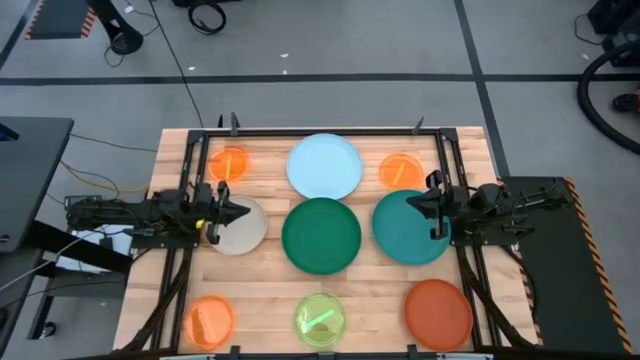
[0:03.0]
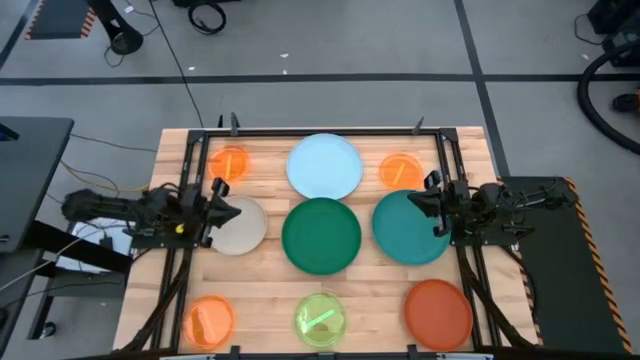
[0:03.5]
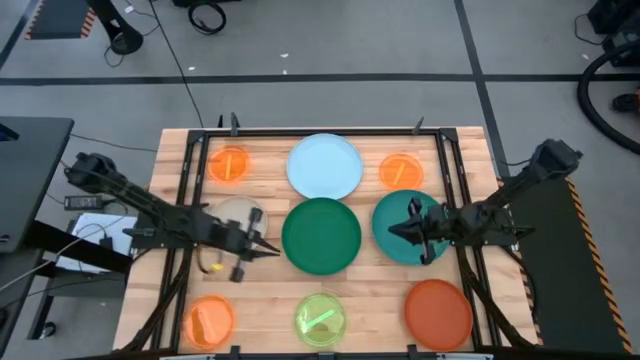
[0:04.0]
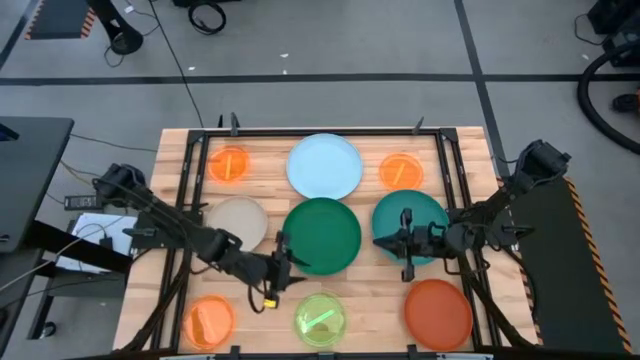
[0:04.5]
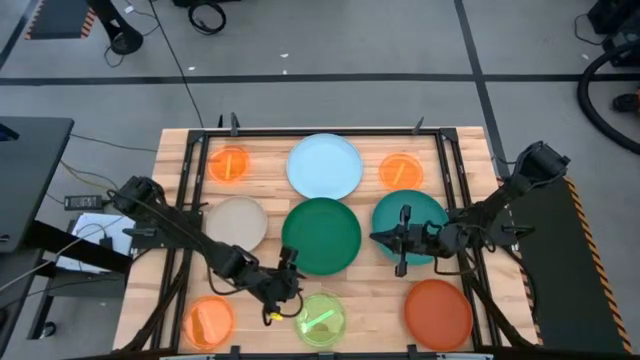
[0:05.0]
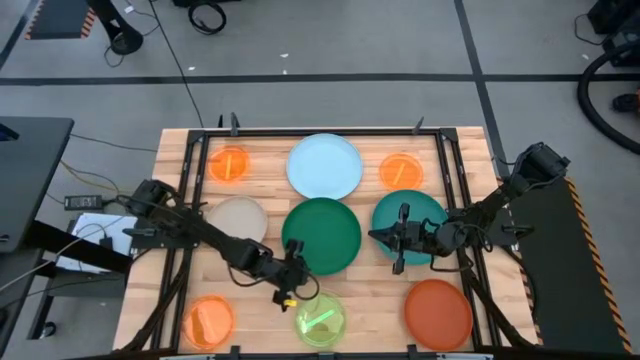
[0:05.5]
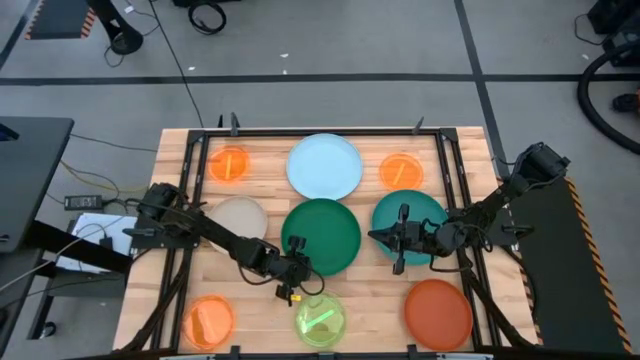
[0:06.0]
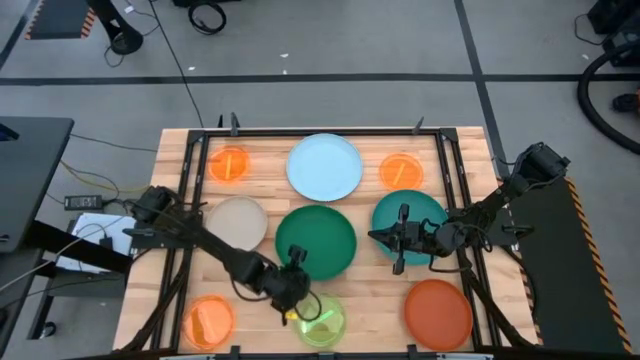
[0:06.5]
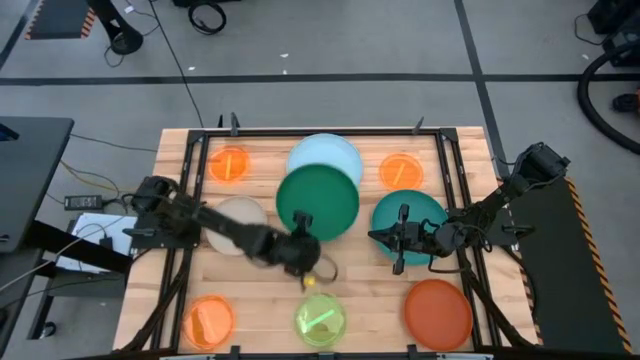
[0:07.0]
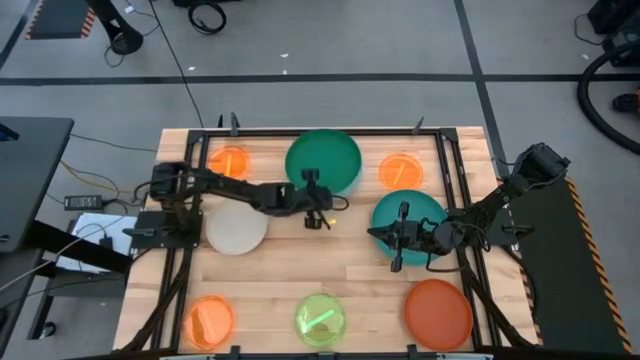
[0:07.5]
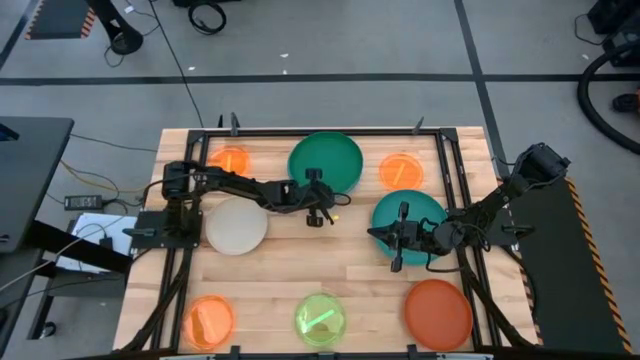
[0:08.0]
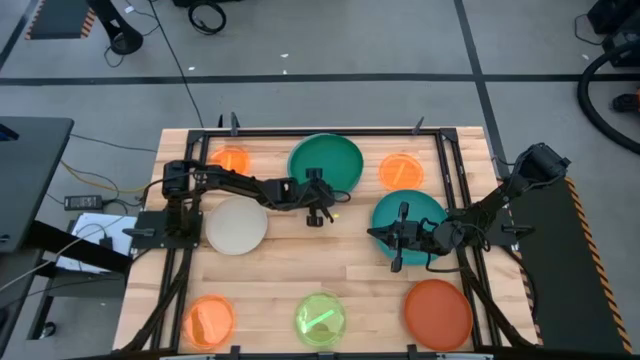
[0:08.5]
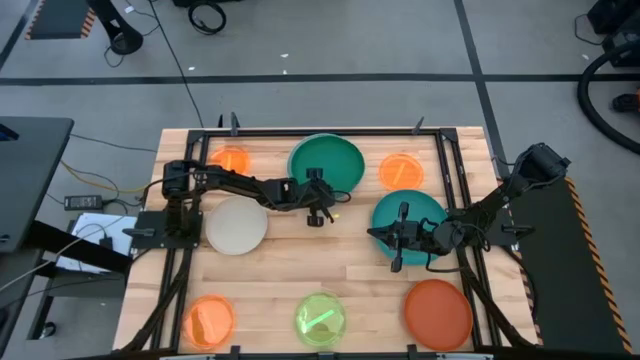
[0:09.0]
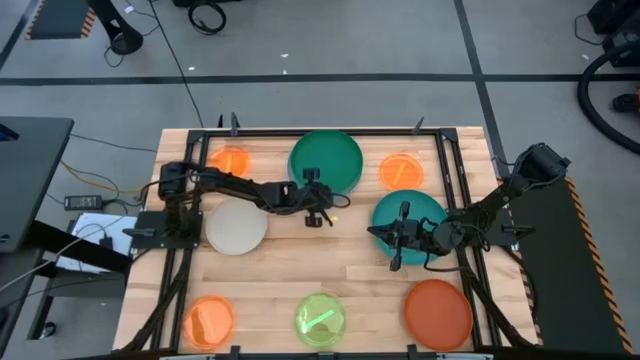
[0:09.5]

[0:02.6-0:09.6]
Task: Stack plastic plates
Stack the dark green plate on top of the light blue plate

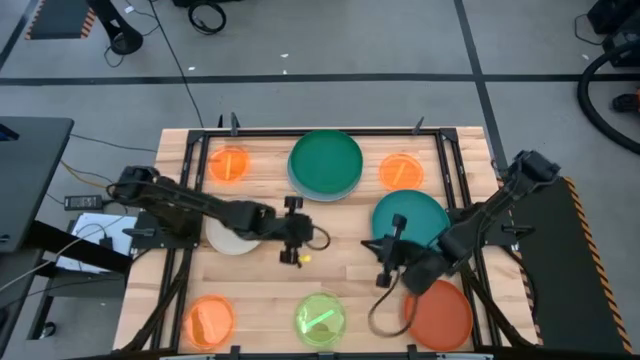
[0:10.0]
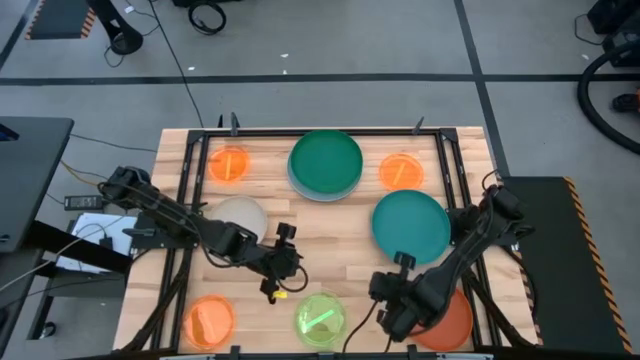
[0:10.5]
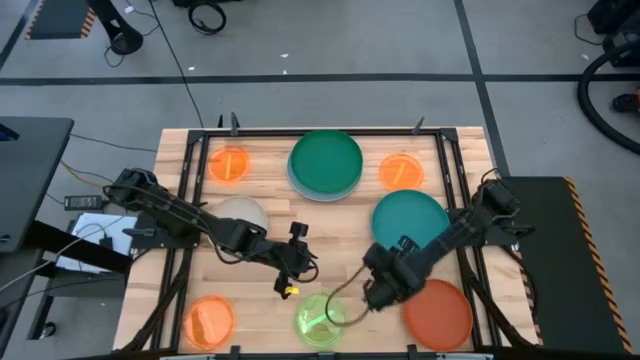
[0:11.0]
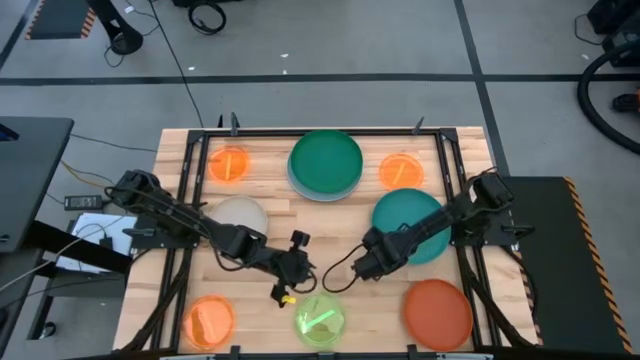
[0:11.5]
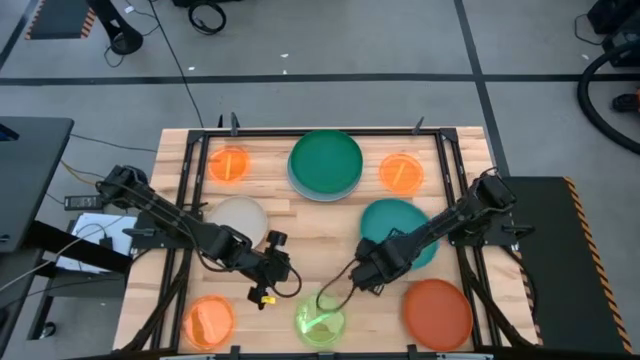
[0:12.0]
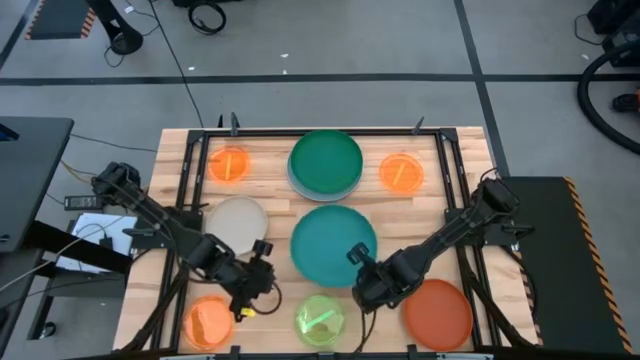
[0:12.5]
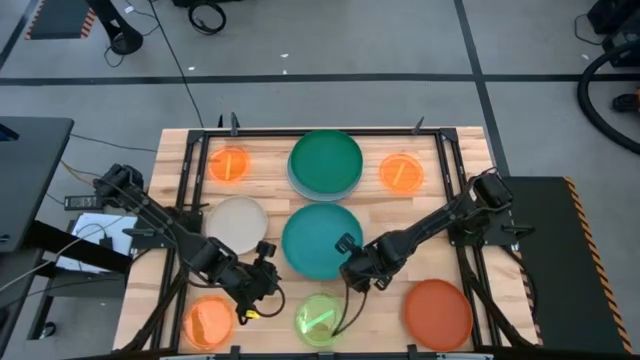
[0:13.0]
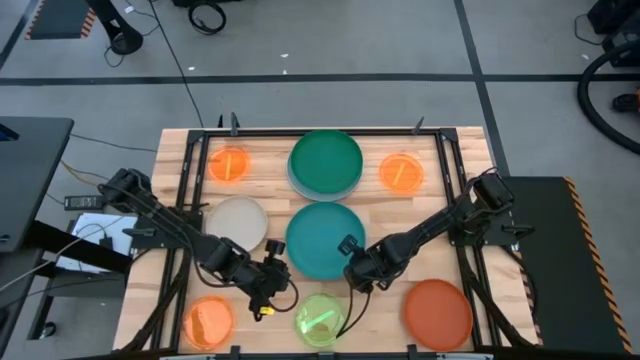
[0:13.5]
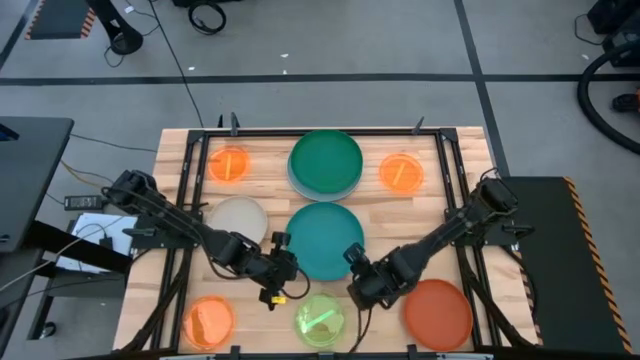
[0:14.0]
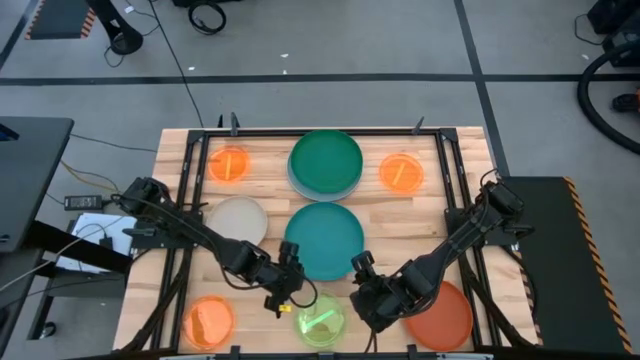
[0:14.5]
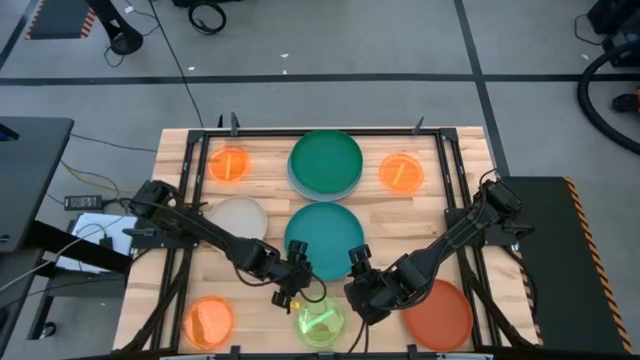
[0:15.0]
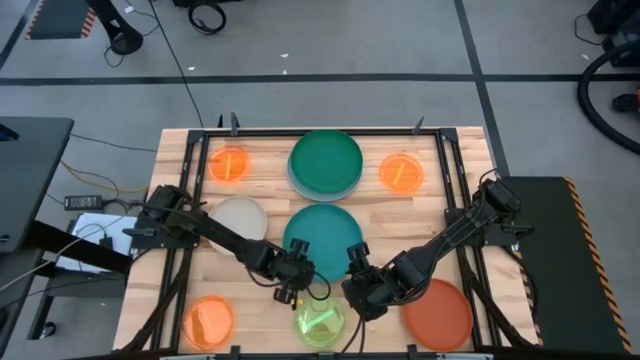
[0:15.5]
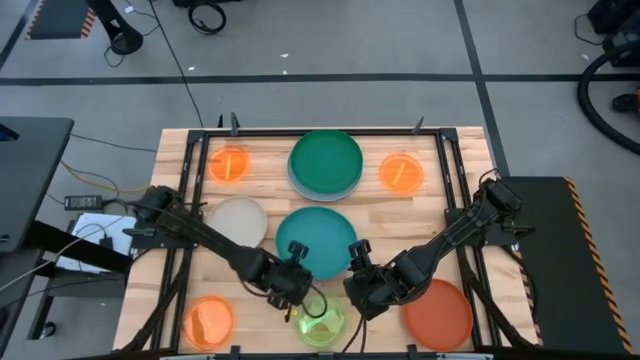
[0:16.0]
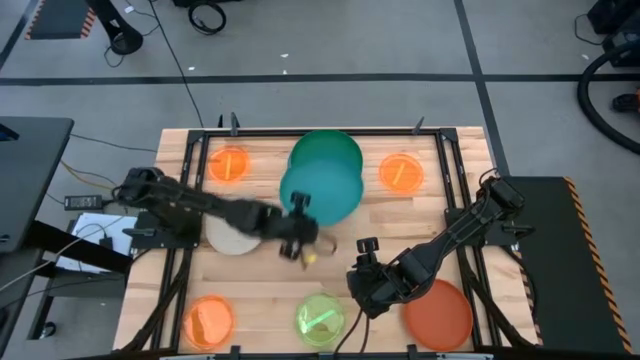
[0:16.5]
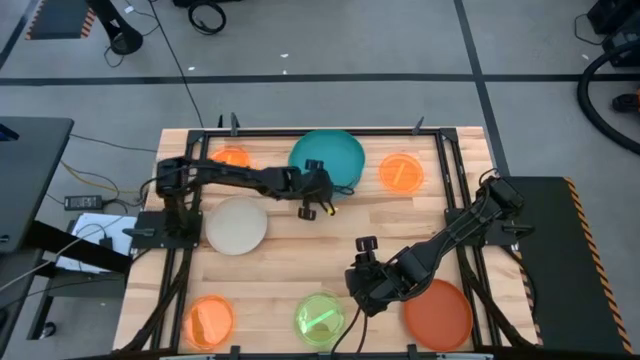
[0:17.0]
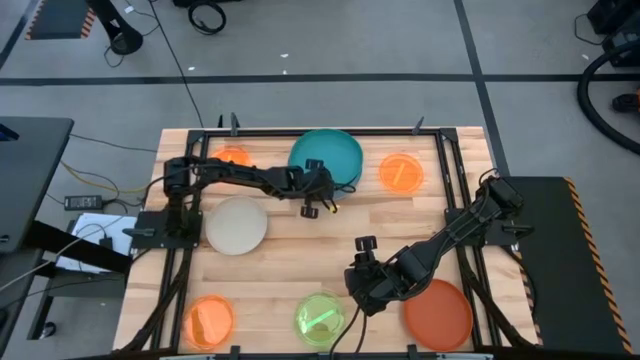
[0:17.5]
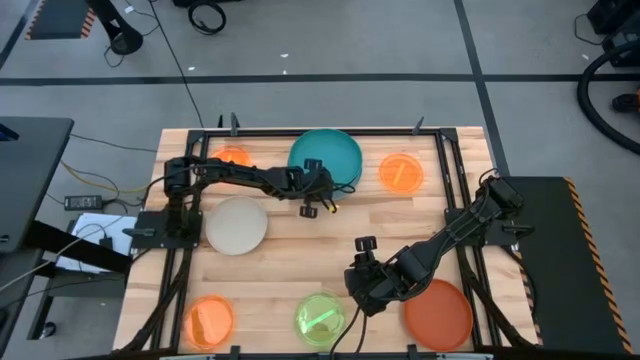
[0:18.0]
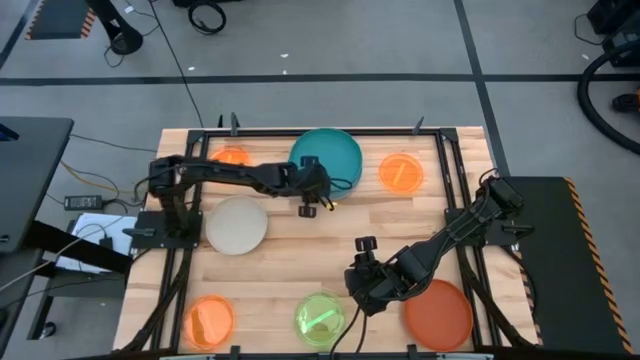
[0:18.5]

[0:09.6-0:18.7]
Stack the dark blue plate on top of the dark green plate

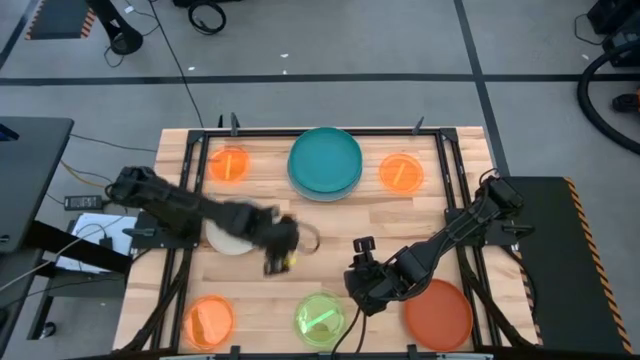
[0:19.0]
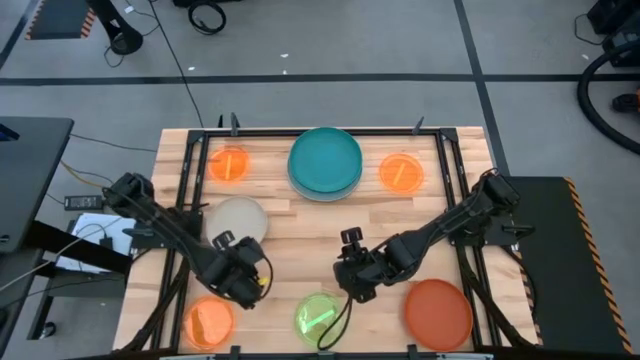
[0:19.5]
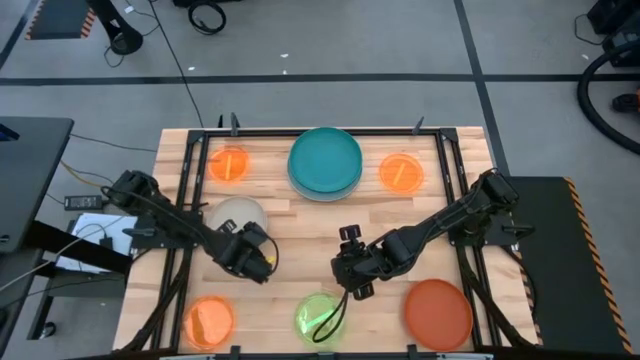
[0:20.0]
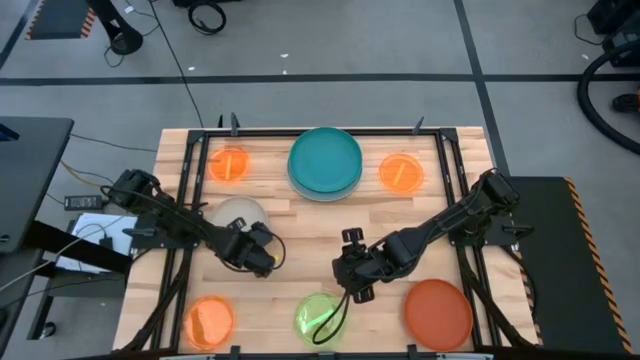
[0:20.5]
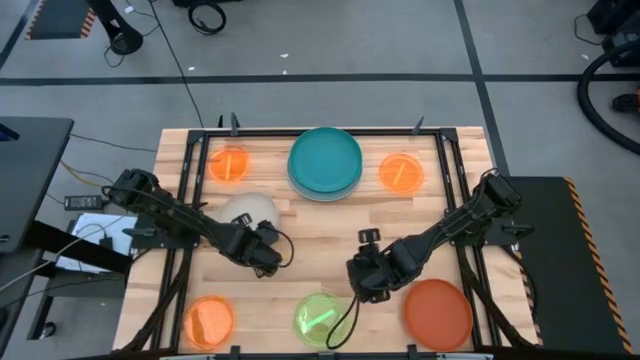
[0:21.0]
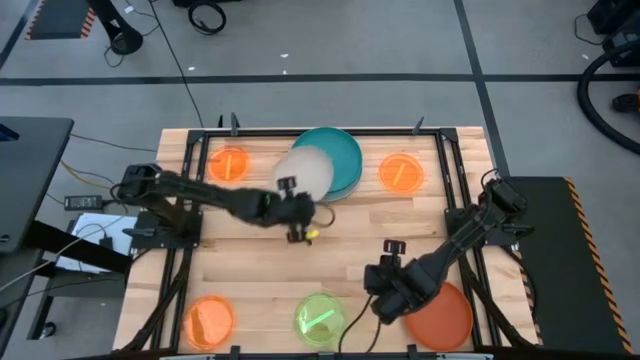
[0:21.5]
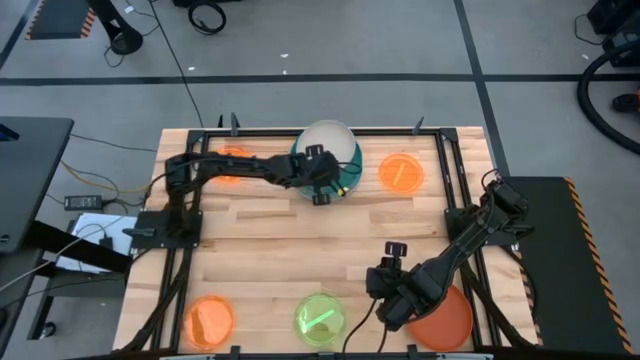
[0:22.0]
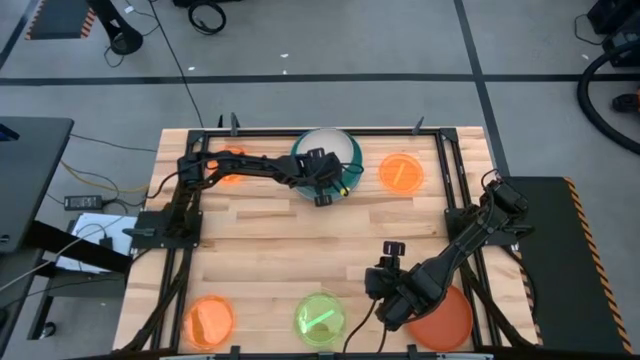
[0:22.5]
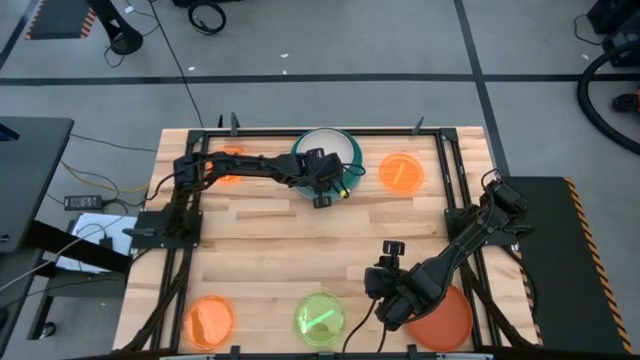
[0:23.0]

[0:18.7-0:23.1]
Stack the gray plate on top of the dark blue plate
